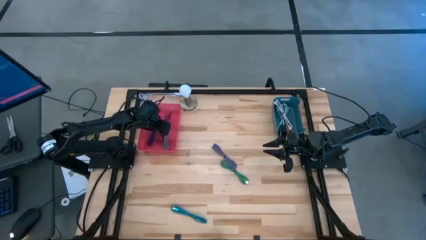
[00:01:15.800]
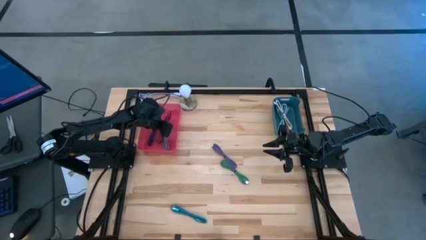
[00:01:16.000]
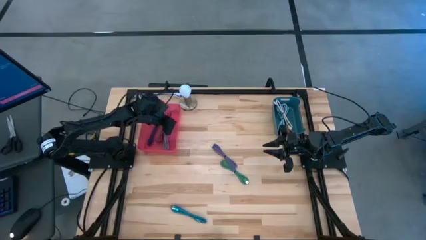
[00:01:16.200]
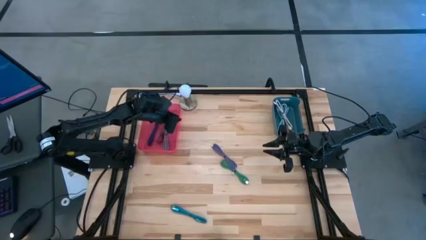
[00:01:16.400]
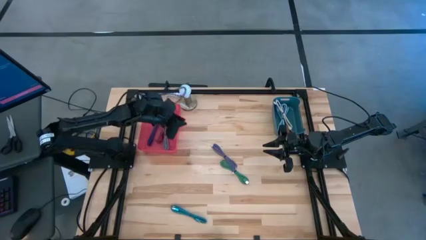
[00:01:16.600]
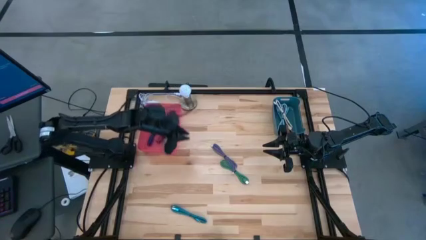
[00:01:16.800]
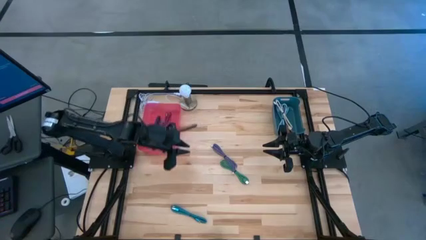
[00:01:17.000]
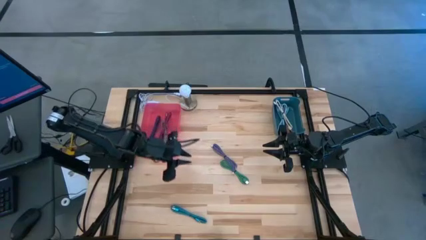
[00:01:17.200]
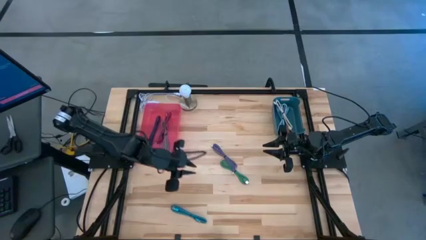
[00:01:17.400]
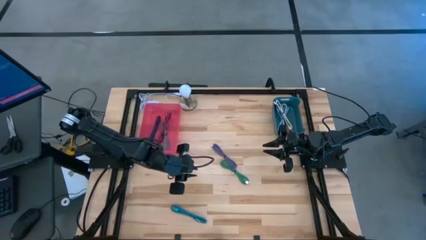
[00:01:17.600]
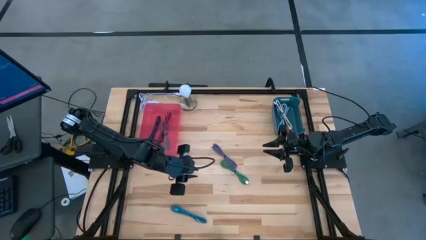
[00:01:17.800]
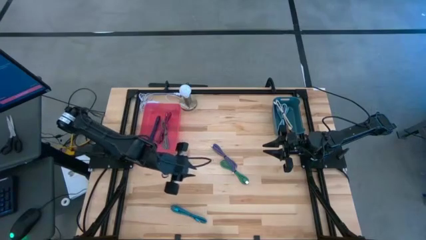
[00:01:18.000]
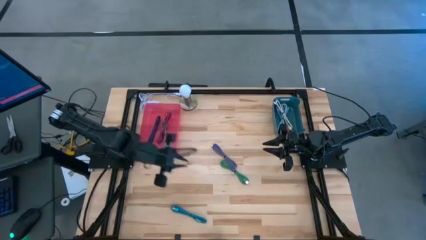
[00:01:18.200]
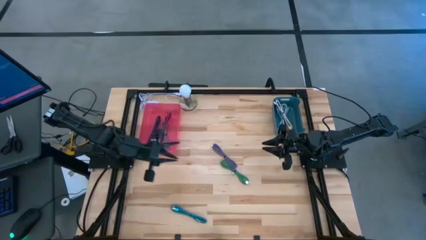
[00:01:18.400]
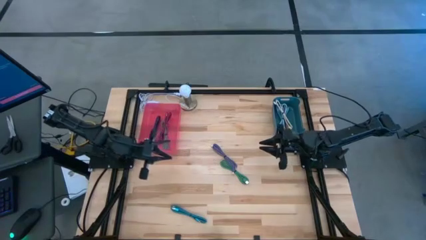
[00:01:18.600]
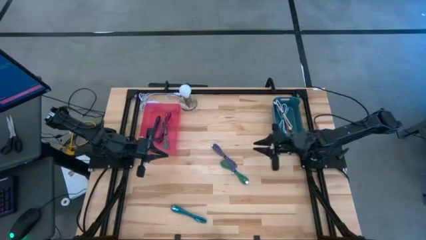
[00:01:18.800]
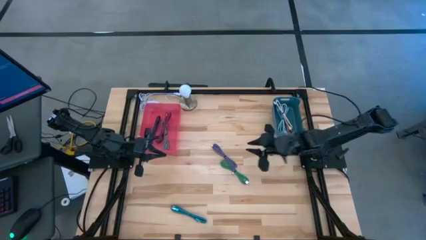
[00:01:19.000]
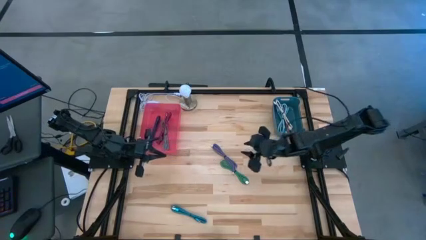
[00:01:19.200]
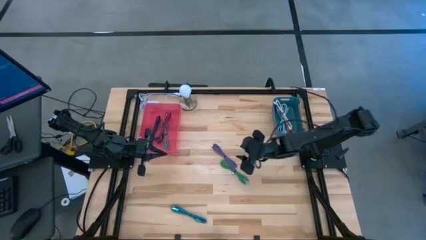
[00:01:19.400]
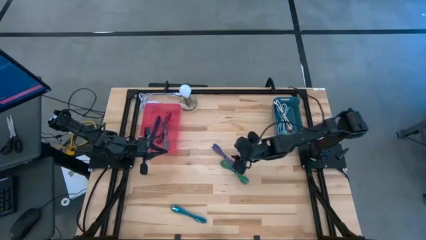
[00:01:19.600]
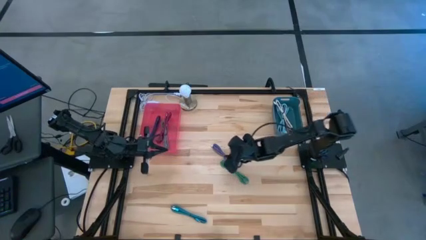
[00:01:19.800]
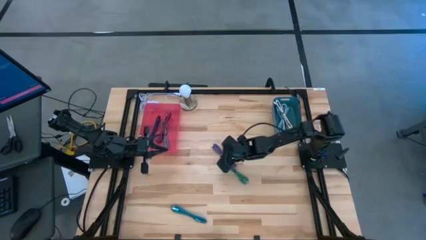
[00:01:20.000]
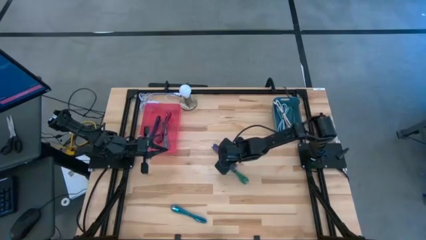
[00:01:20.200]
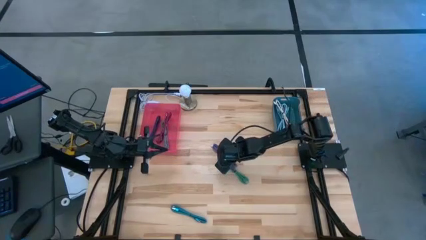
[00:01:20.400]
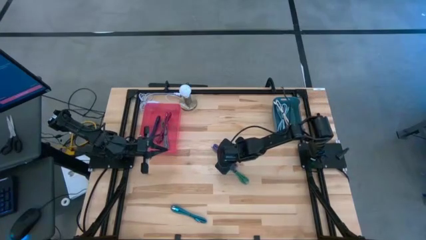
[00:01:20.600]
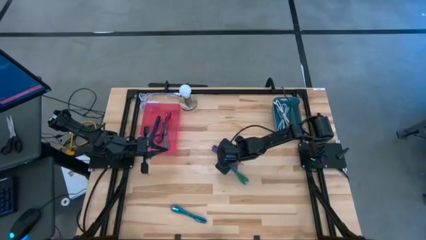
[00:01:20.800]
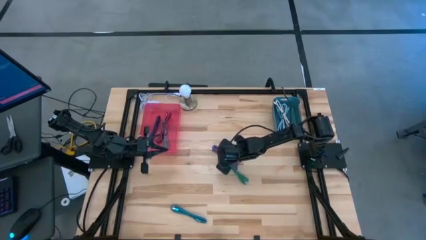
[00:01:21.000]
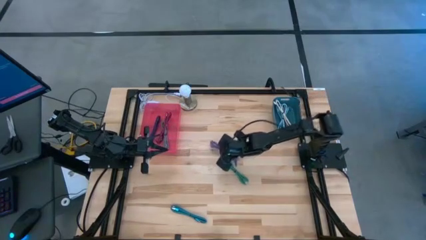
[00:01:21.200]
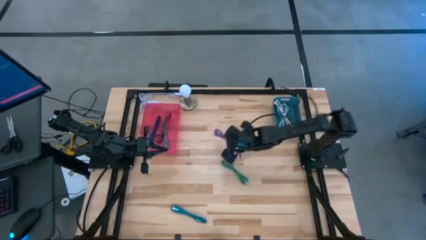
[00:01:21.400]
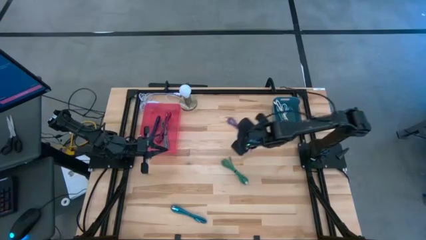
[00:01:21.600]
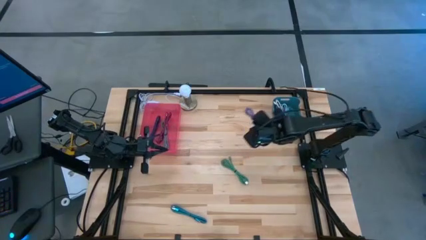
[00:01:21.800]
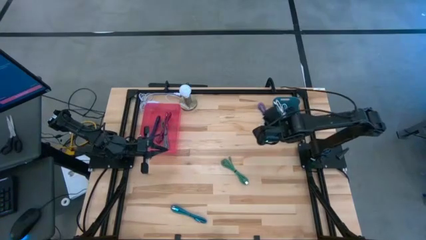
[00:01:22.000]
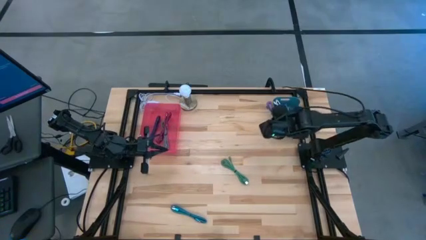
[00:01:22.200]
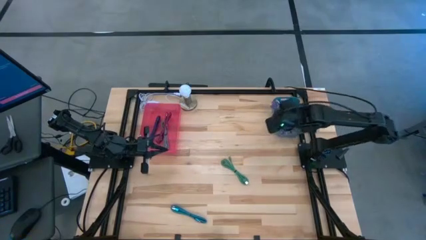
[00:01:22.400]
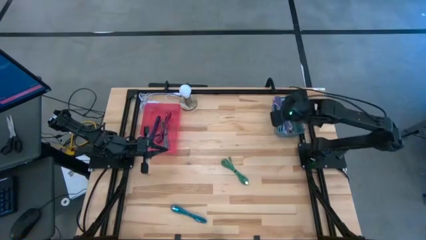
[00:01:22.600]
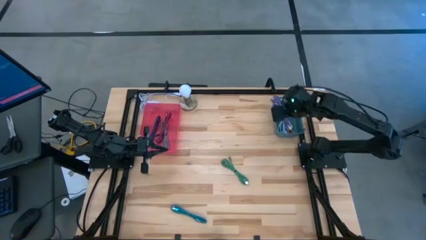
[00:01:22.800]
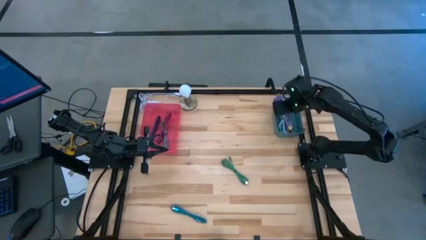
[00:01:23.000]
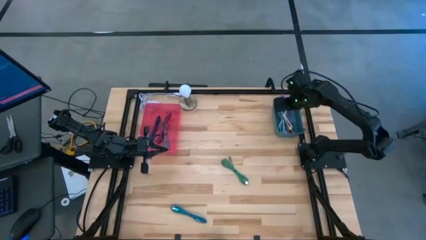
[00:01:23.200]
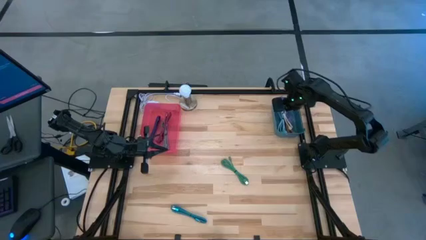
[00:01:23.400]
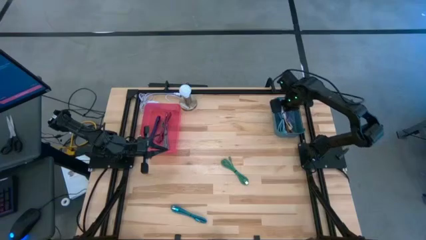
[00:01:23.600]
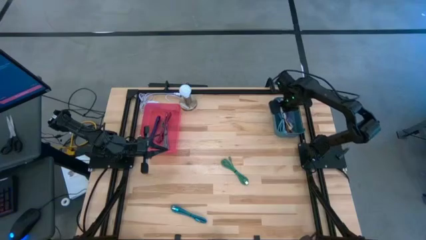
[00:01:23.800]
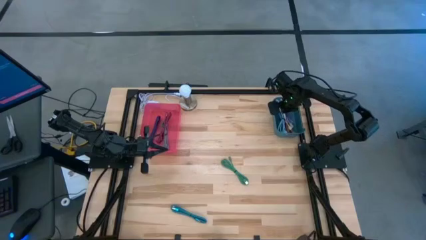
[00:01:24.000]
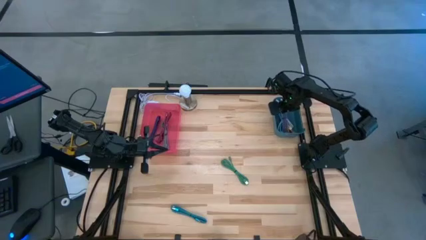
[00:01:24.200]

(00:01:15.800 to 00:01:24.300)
Task: Pick & Place USB Port
Put the purple charger cable into the blue bin

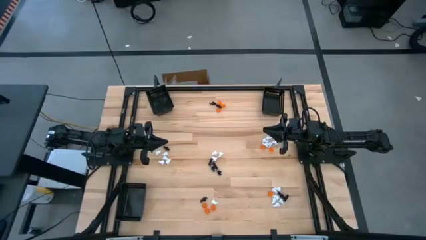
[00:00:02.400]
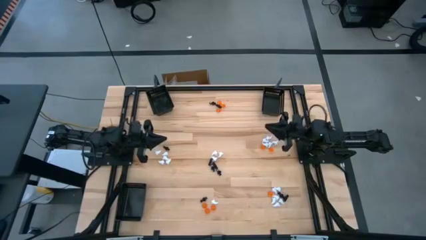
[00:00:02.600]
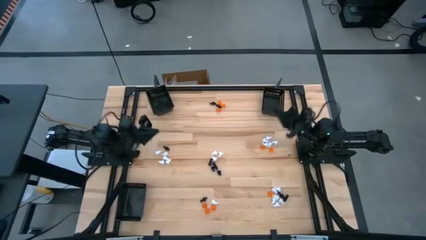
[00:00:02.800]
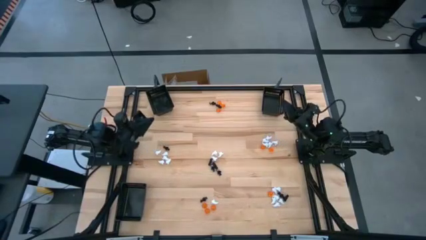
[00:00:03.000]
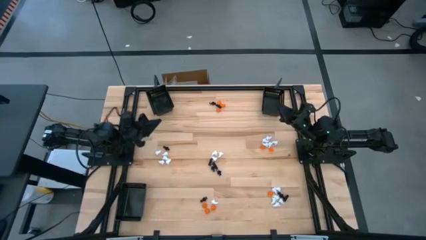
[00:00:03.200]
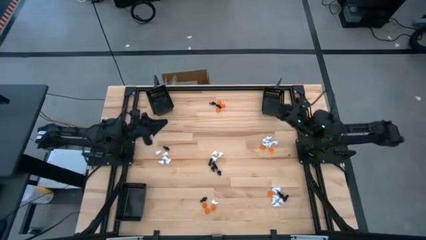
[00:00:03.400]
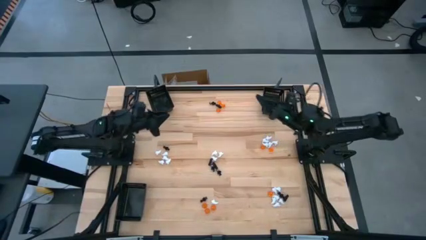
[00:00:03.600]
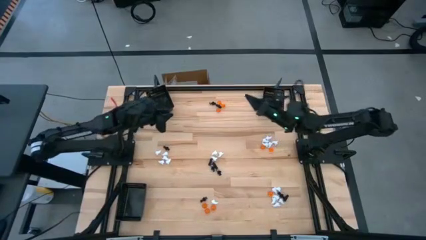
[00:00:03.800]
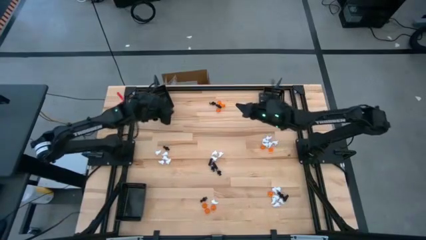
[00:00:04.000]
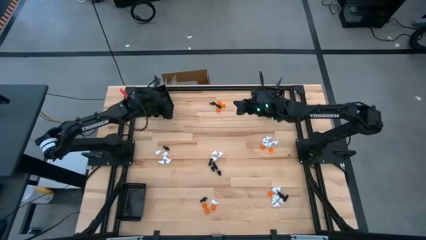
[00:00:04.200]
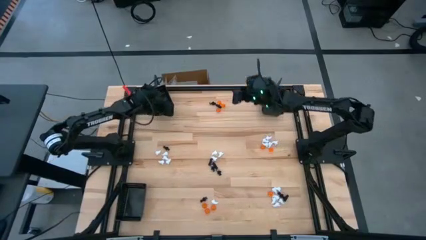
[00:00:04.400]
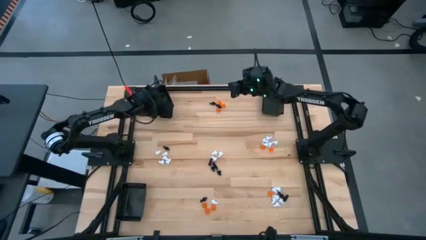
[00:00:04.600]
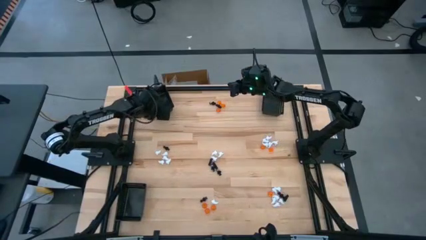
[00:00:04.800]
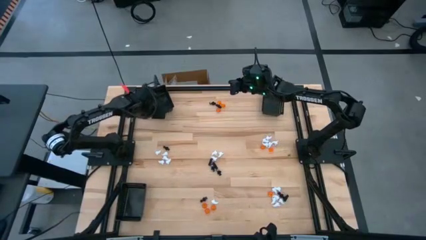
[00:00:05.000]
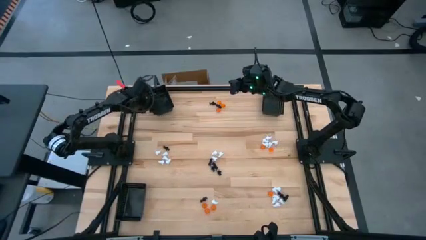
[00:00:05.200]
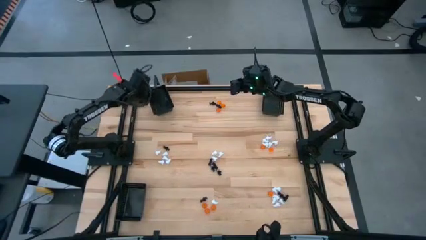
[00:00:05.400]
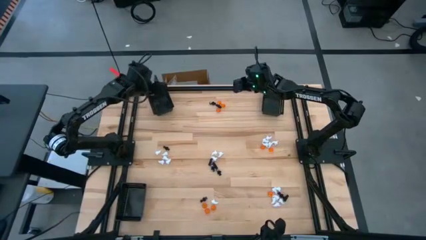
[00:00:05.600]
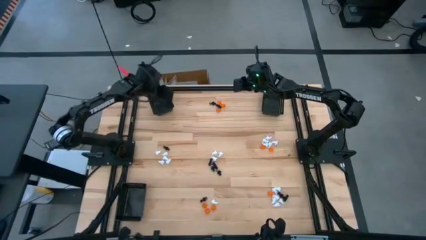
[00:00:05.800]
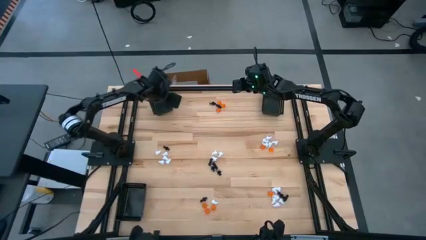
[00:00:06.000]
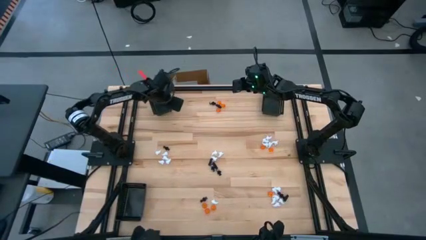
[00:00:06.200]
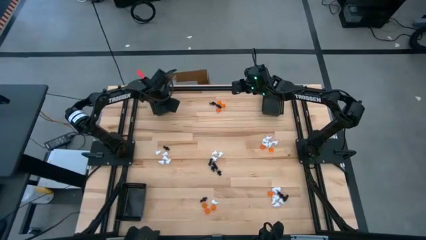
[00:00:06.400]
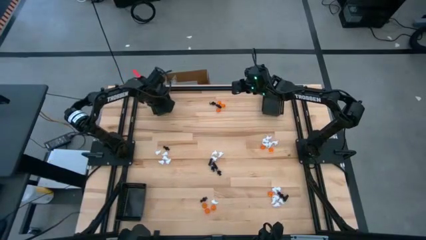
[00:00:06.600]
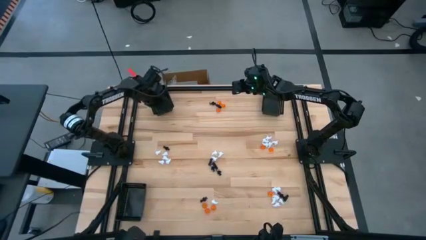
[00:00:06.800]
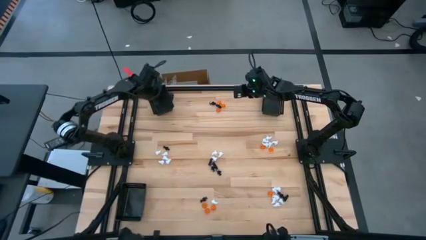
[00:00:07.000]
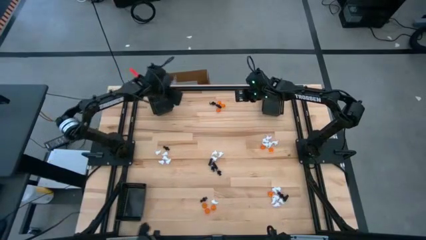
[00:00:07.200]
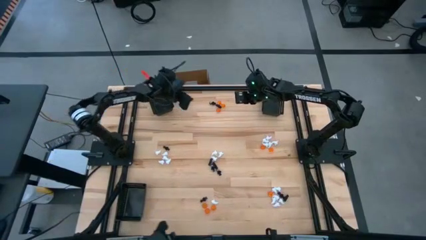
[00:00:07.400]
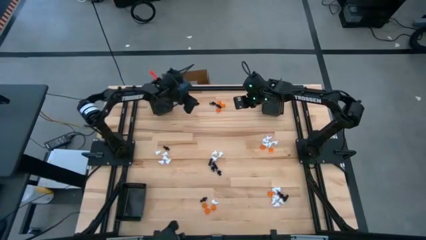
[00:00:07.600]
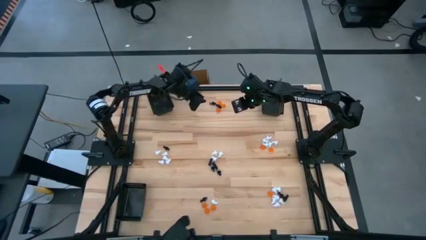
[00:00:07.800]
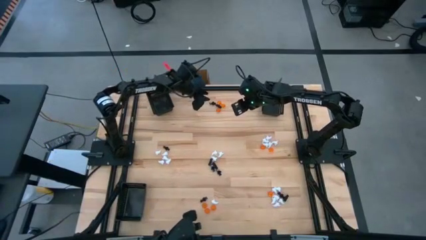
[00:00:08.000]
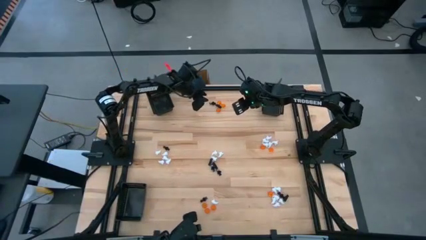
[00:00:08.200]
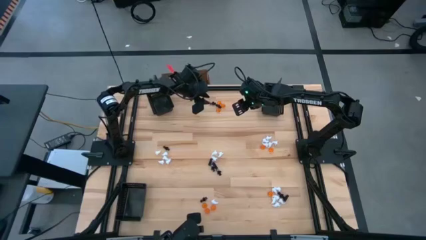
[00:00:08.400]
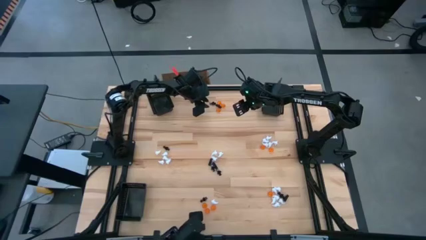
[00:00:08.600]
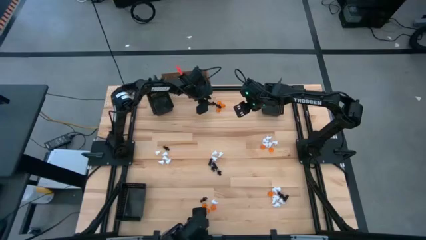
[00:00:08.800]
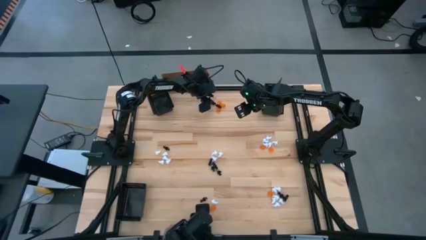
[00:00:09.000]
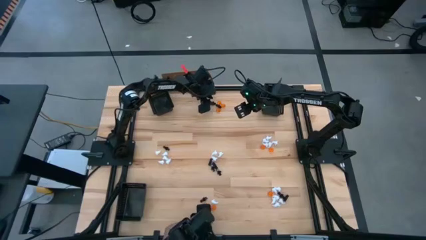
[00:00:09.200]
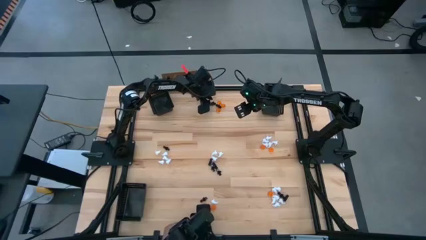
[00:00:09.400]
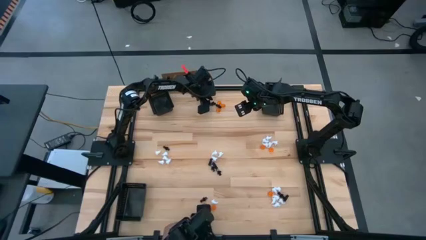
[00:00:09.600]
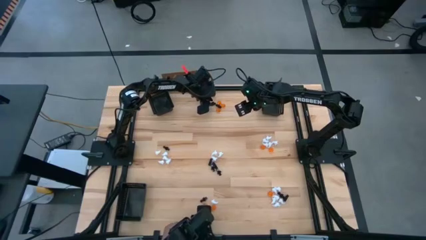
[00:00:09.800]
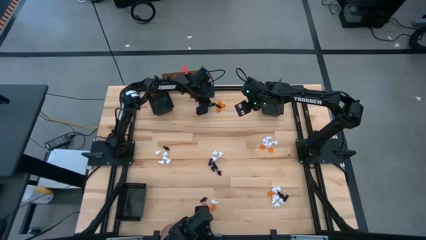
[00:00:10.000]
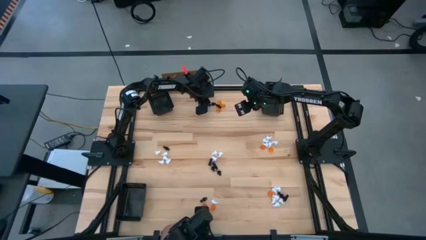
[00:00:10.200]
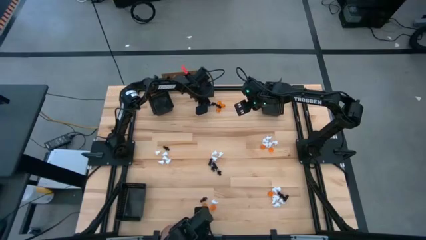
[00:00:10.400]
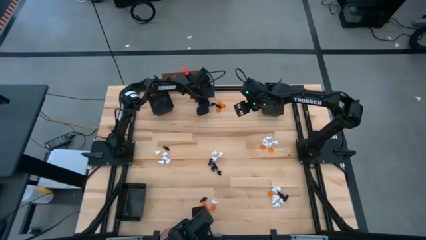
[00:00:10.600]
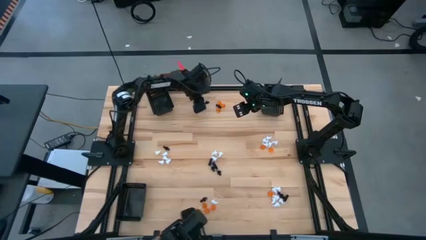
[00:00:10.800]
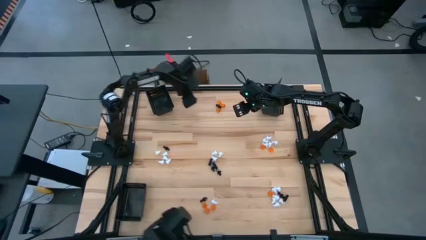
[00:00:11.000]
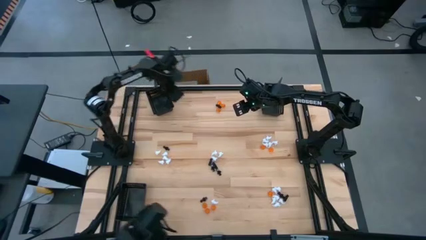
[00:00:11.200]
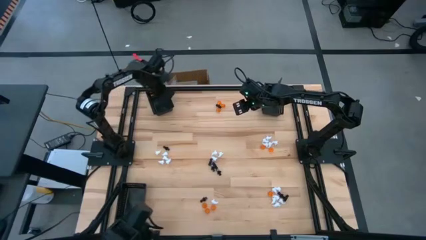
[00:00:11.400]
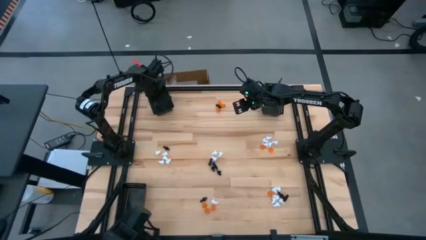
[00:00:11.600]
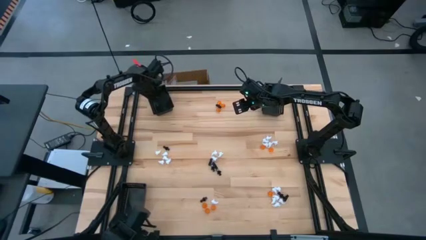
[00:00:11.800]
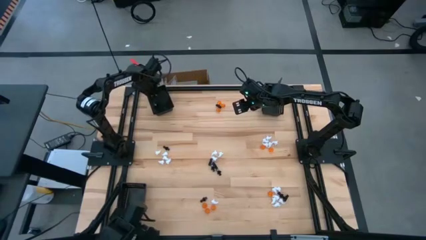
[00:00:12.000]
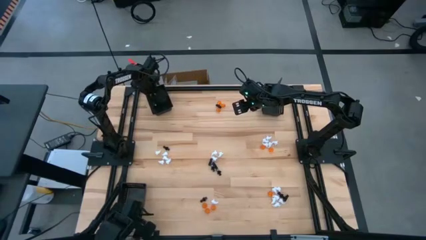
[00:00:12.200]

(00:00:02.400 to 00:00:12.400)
Task: Sort Halloween decoration
Put the black skeleton toy into the top left black basket
